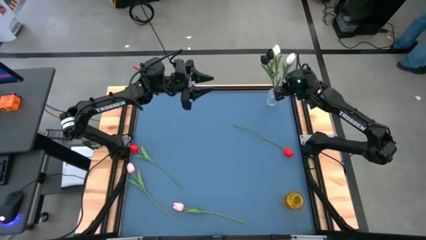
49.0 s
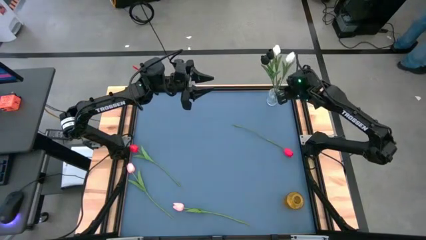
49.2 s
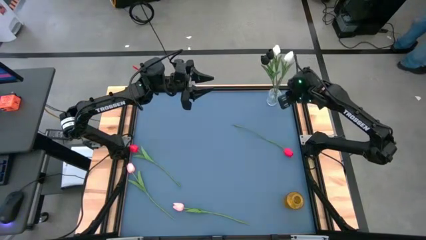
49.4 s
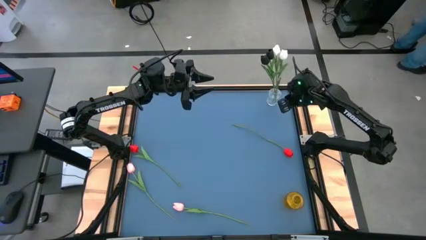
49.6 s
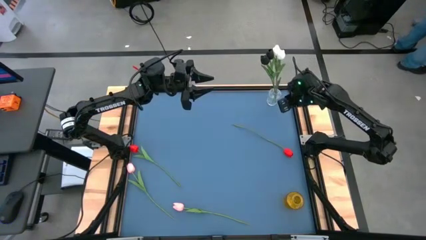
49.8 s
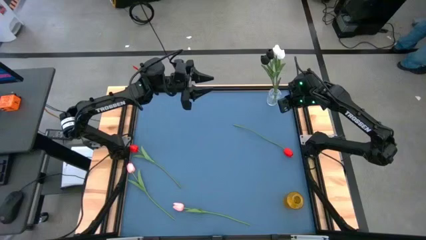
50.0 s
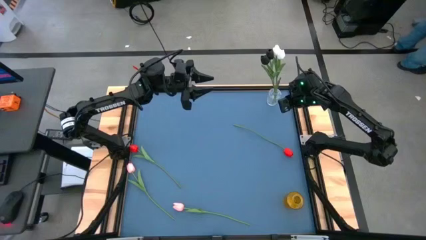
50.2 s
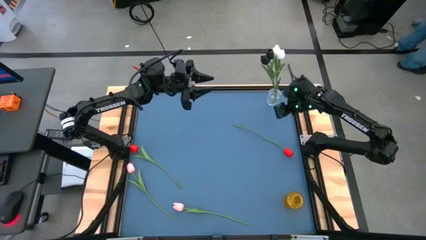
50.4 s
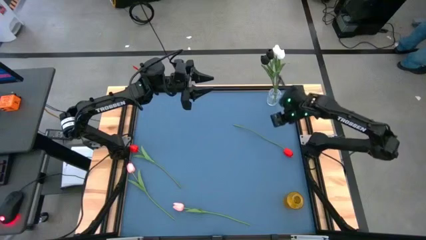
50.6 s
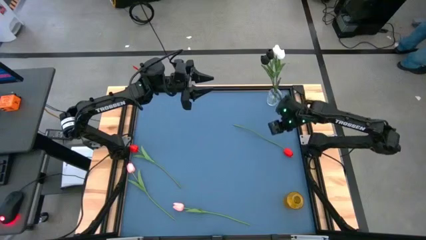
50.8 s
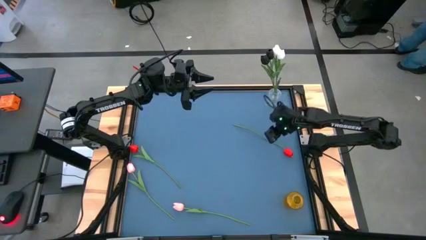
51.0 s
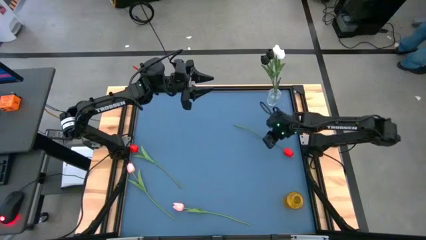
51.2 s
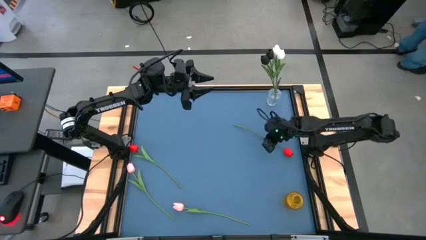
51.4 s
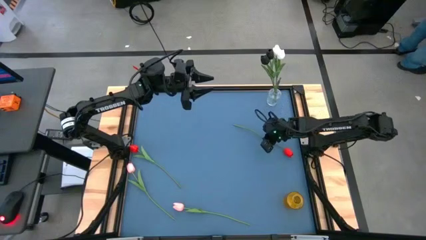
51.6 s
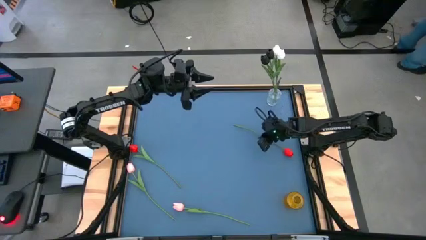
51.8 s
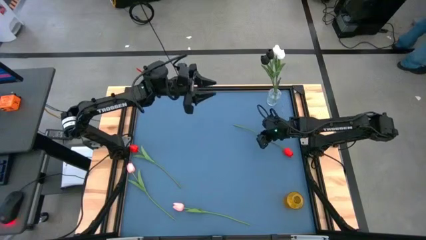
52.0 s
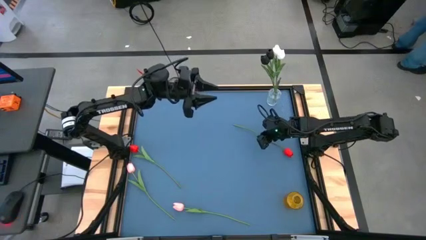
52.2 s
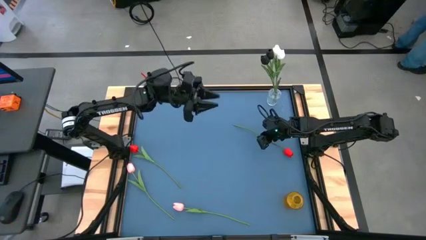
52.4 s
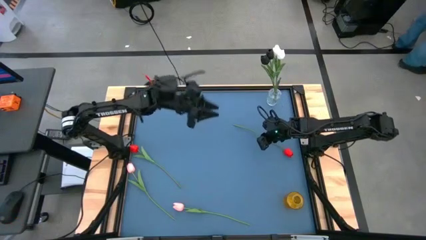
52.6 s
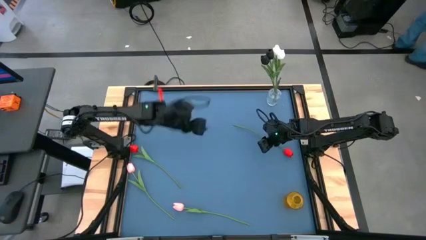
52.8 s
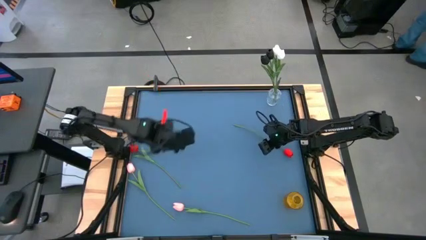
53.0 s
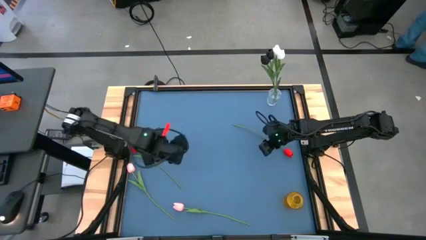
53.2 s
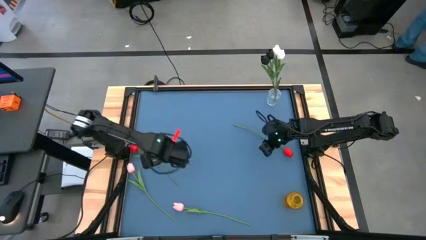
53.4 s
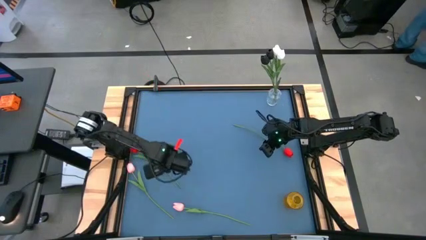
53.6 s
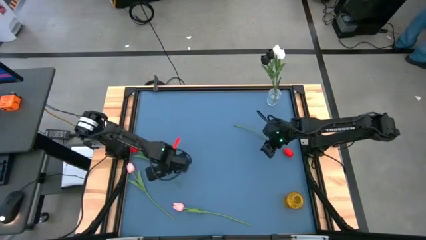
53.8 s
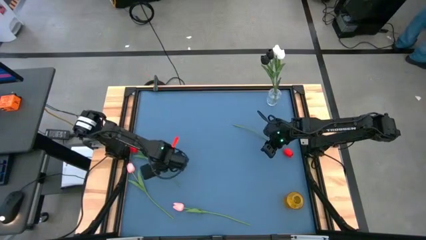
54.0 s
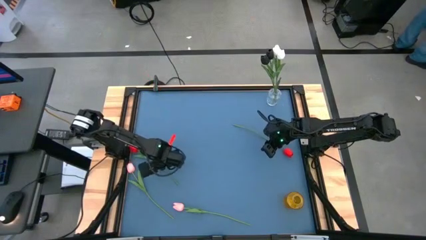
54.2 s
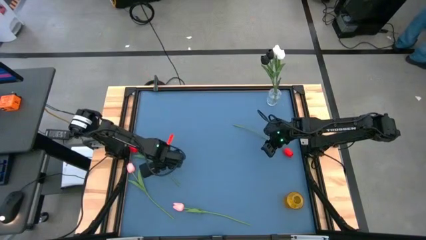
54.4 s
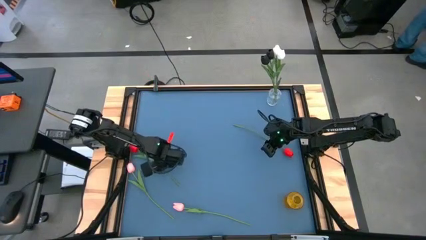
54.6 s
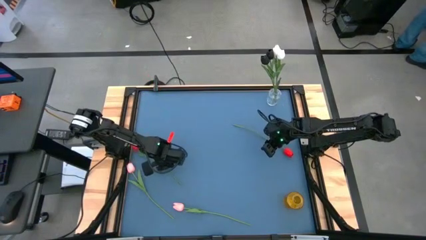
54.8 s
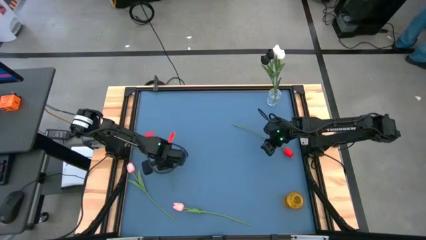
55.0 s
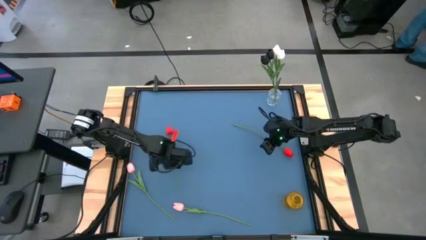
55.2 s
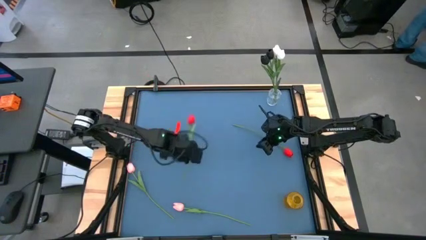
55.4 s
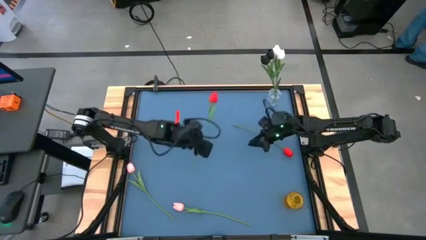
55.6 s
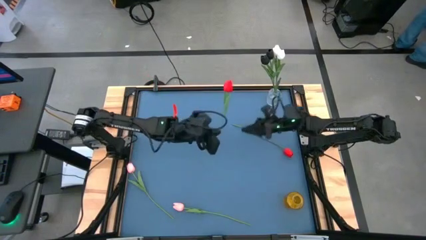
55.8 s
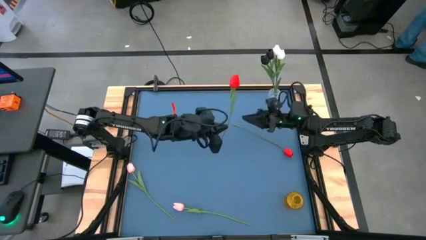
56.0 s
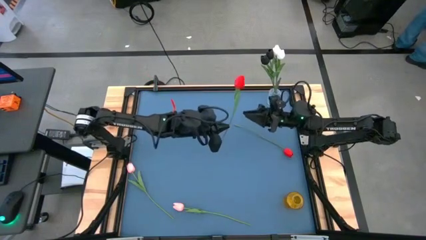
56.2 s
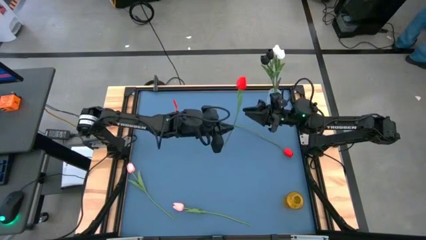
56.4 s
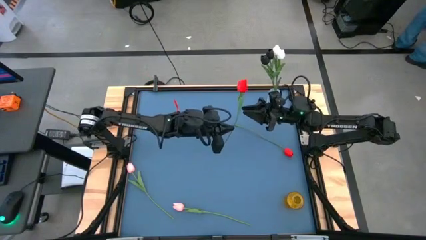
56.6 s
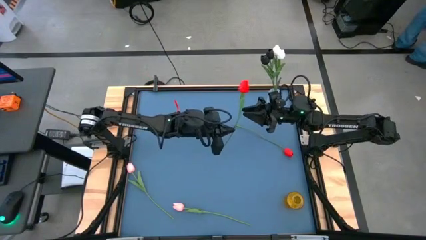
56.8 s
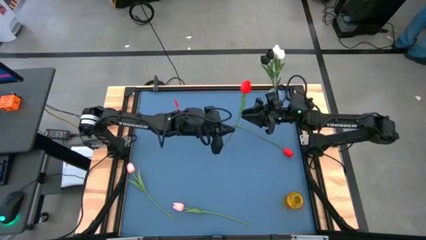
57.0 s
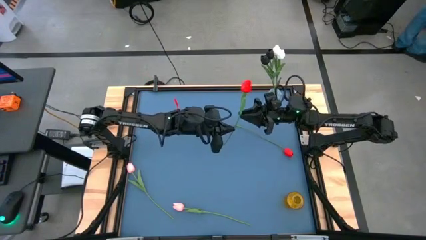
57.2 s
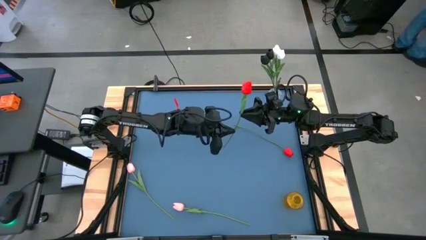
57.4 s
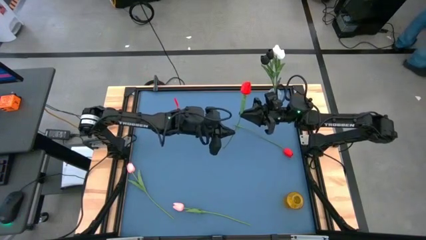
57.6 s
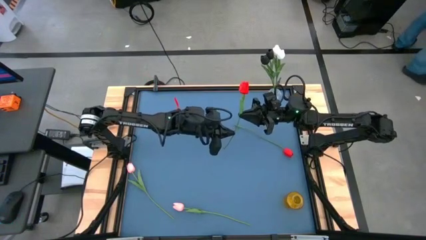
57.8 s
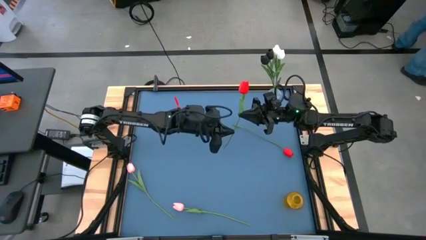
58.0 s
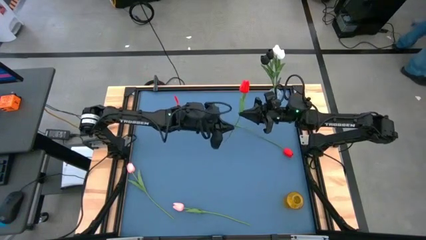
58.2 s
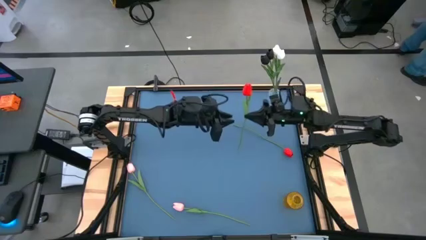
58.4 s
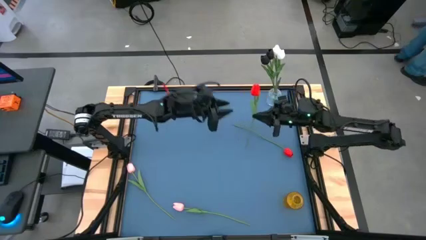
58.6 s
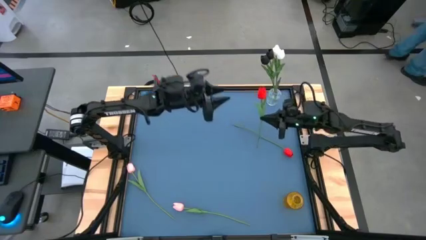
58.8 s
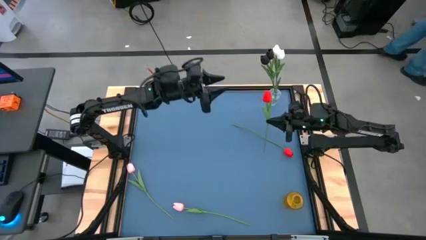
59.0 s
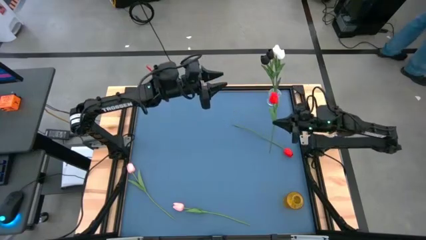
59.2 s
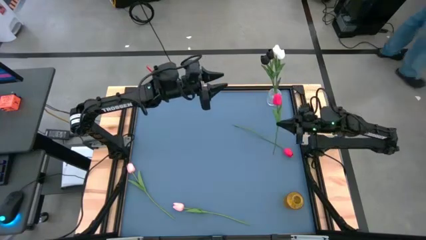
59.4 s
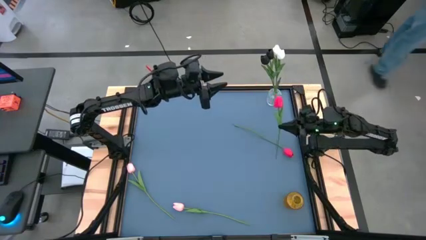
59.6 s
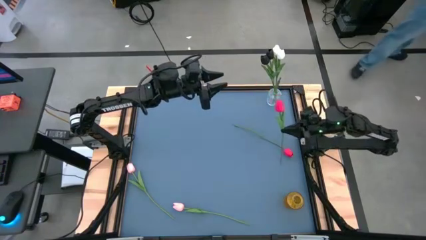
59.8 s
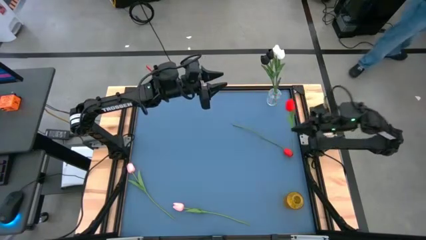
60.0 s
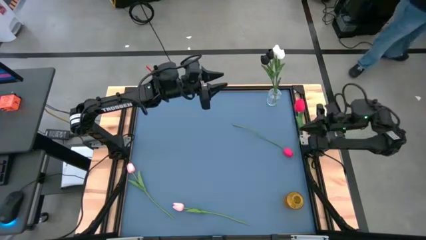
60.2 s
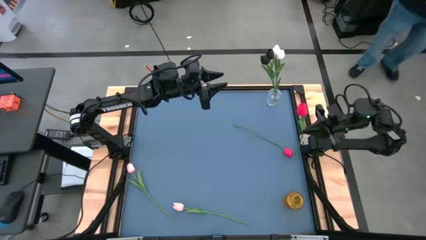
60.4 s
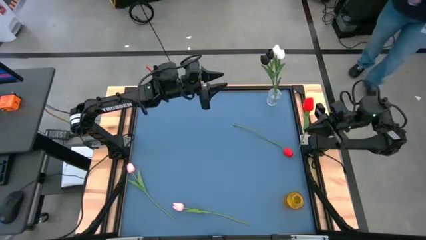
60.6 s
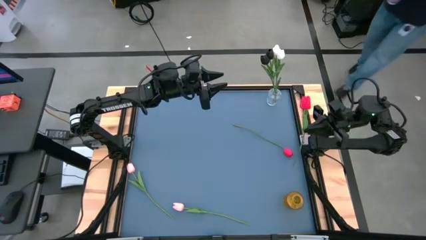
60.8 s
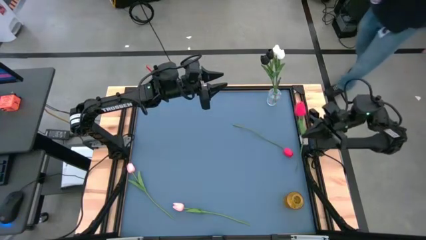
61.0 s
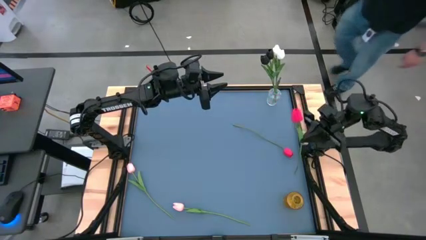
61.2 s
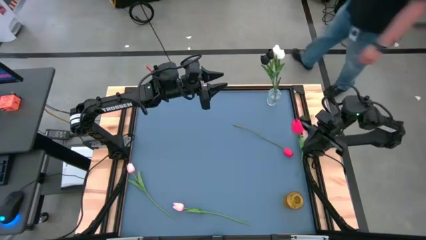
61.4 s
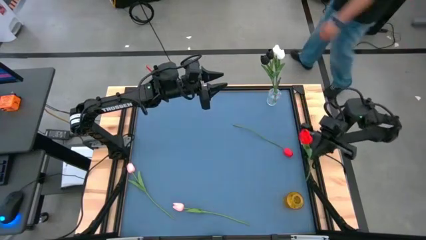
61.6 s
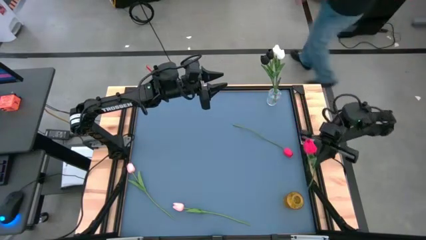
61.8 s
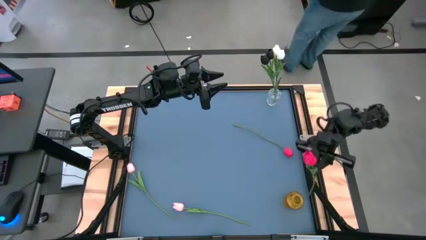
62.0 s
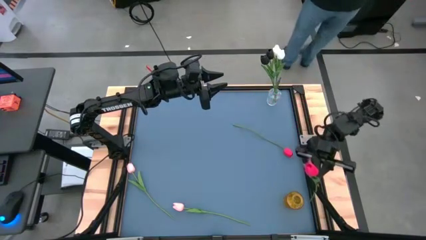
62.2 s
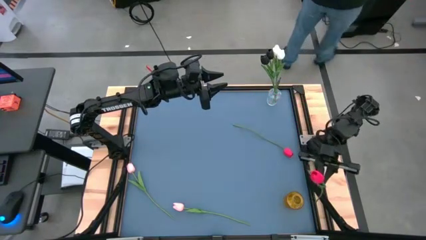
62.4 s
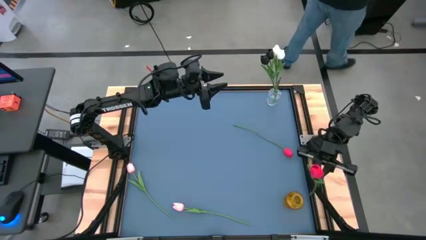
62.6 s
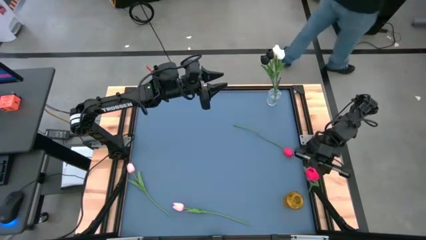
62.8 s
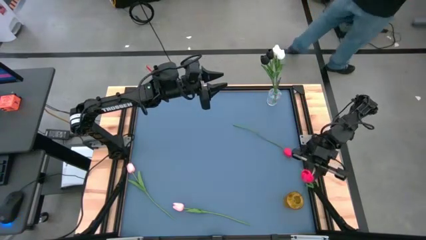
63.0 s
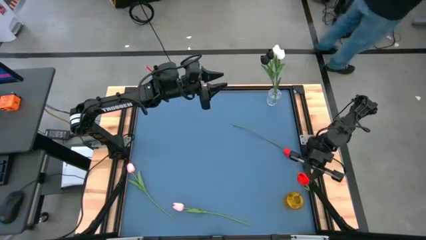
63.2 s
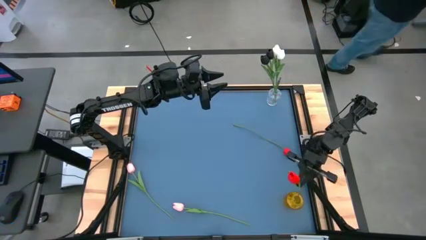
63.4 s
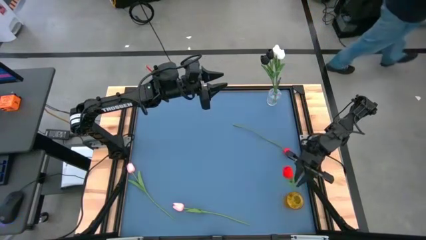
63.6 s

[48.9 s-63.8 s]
Task: Sort flowers into vase by color
Put the left red tulip into the yellow vase

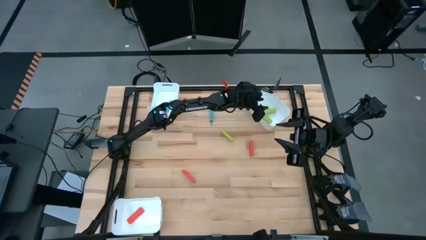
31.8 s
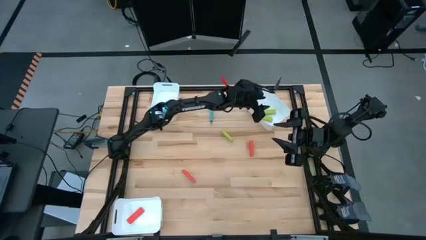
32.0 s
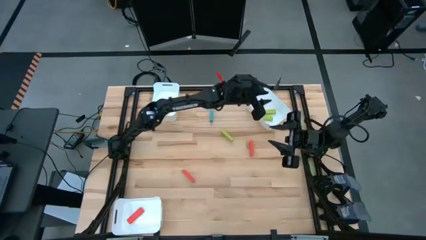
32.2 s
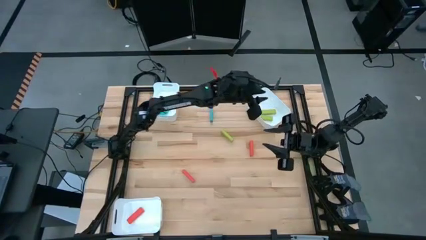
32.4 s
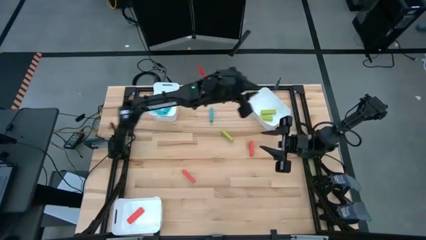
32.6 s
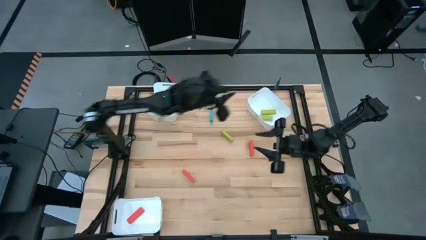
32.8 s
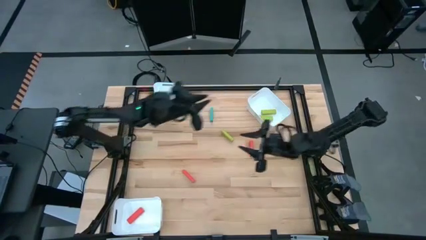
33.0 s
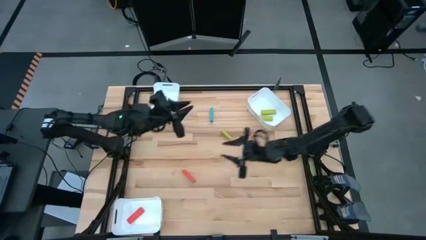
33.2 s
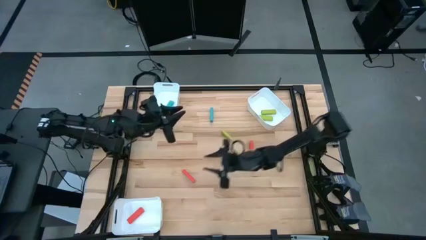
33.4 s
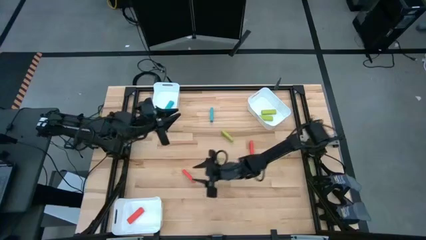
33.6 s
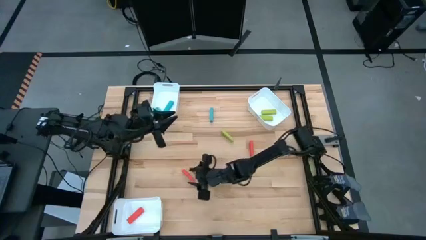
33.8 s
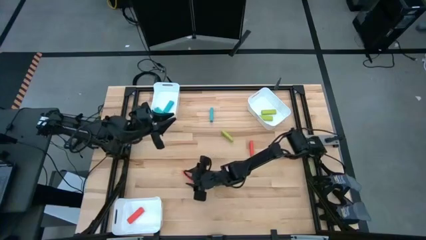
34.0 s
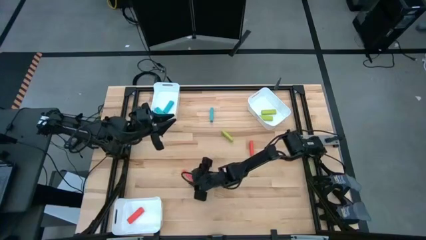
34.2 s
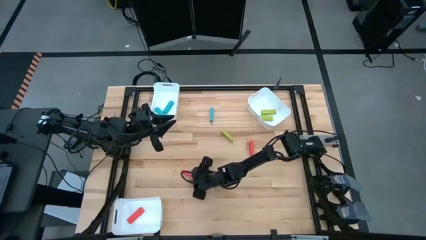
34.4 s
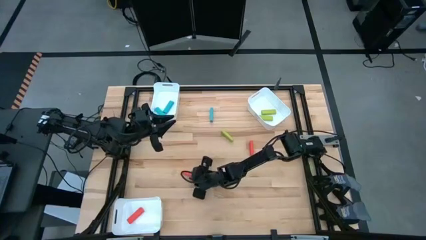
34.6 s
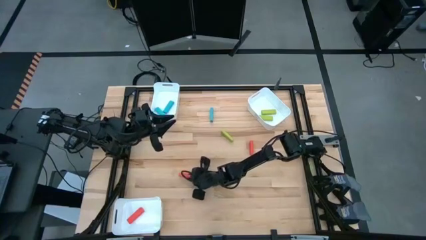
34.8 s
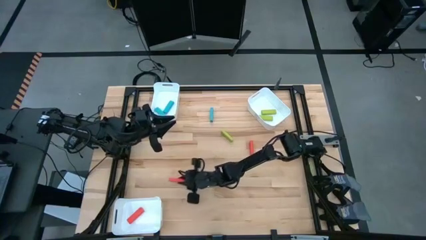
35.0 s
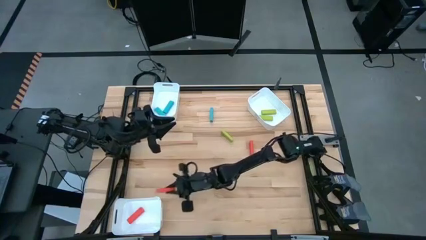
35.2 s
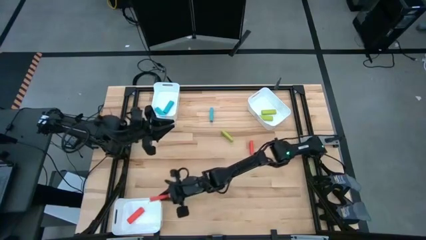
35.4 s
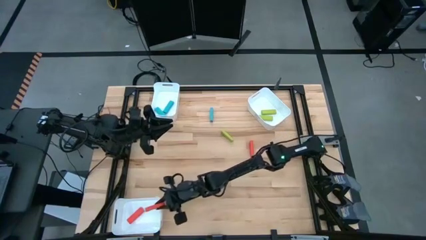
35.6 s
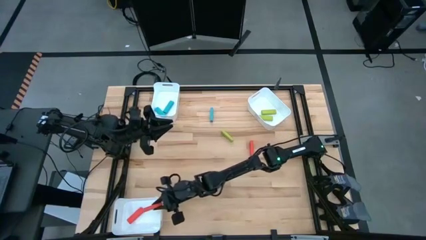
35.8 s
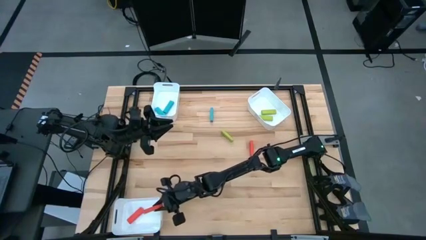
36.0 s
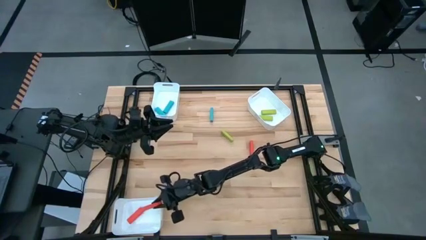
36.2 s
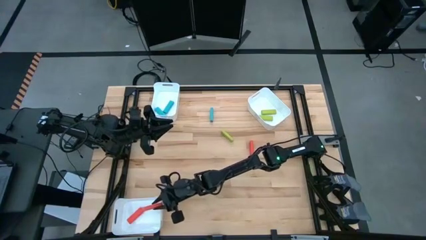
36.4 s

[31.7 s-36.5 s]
Task: Sort blocks
Put the left red block into the bottom left white bin
